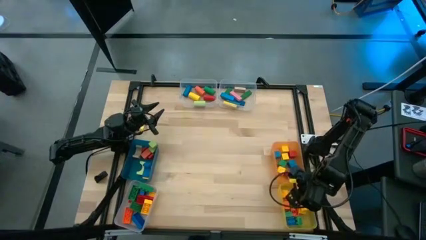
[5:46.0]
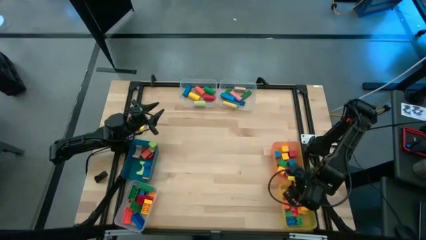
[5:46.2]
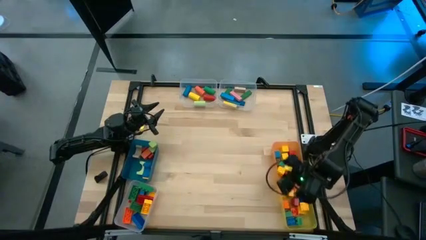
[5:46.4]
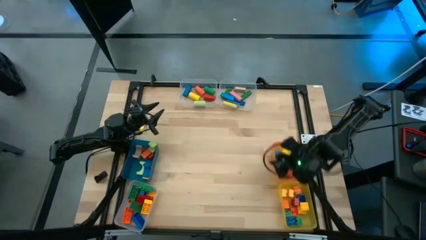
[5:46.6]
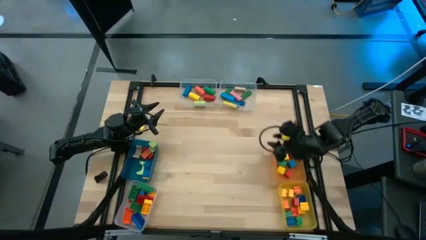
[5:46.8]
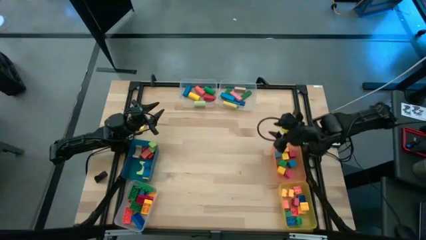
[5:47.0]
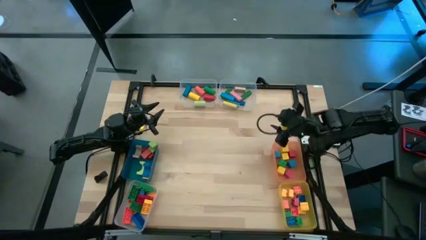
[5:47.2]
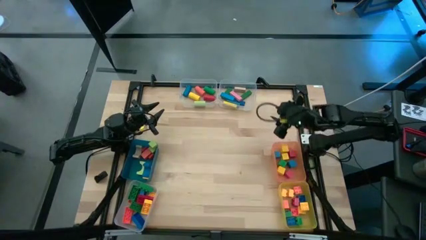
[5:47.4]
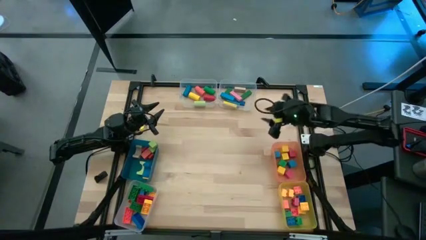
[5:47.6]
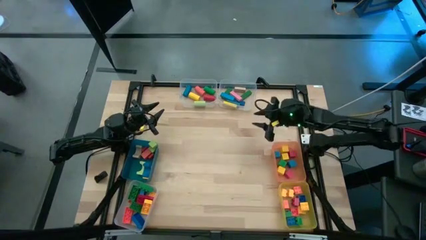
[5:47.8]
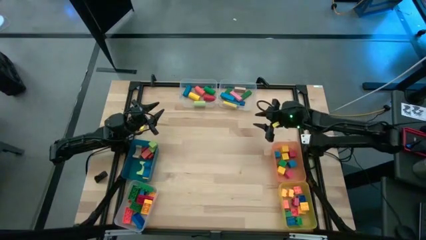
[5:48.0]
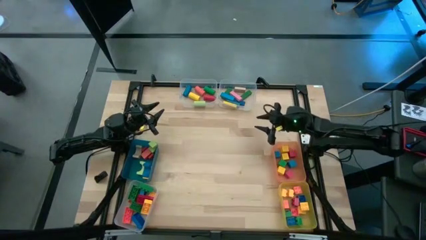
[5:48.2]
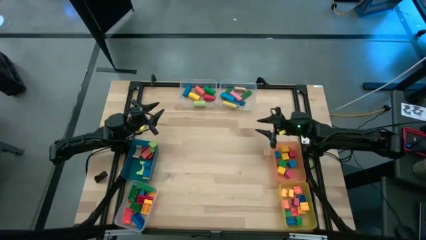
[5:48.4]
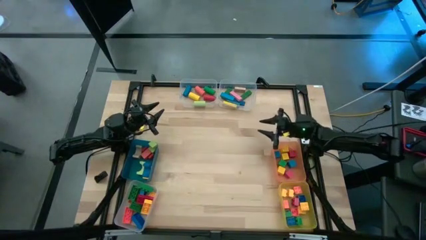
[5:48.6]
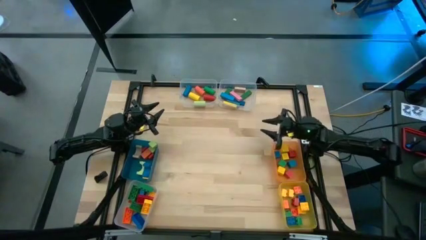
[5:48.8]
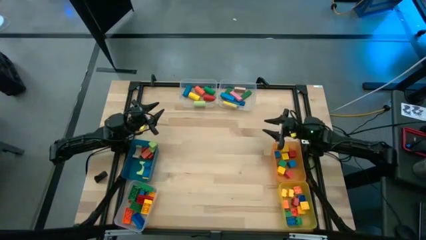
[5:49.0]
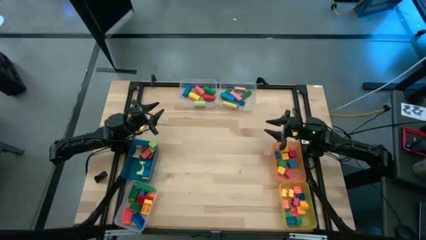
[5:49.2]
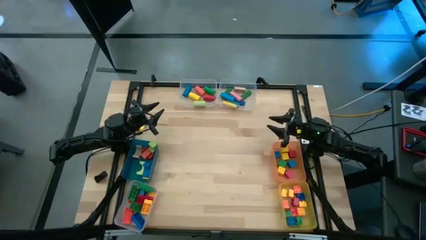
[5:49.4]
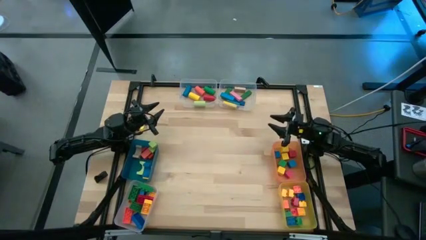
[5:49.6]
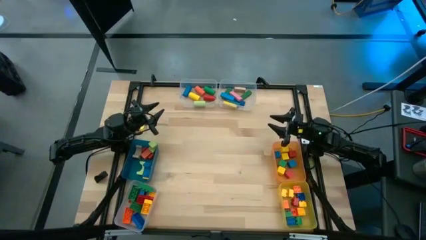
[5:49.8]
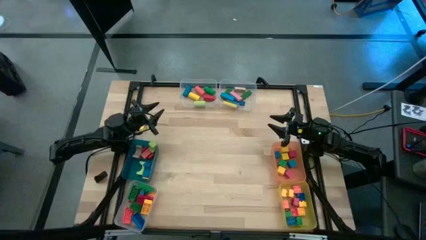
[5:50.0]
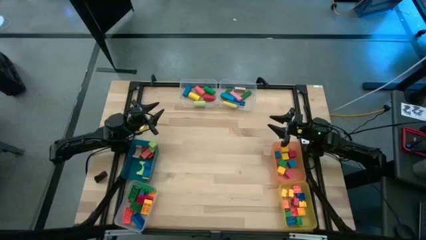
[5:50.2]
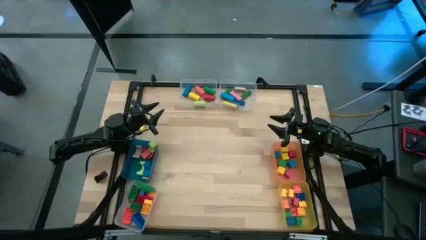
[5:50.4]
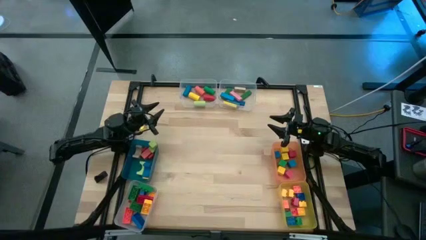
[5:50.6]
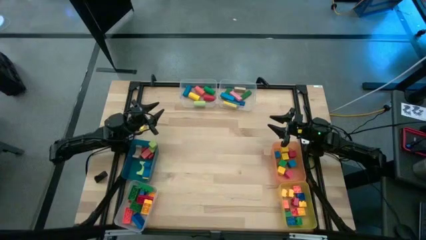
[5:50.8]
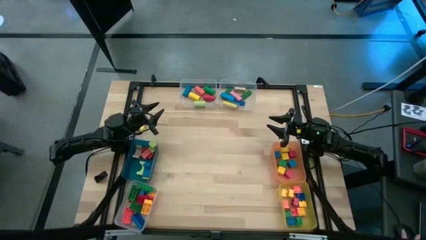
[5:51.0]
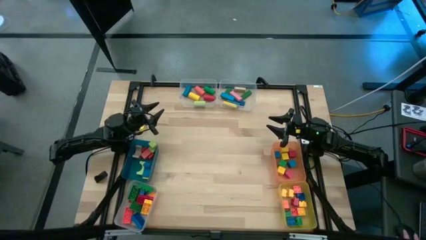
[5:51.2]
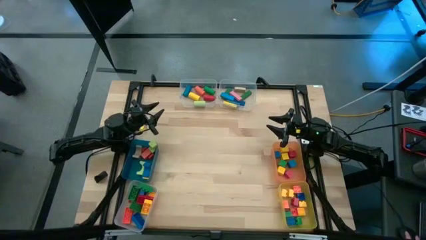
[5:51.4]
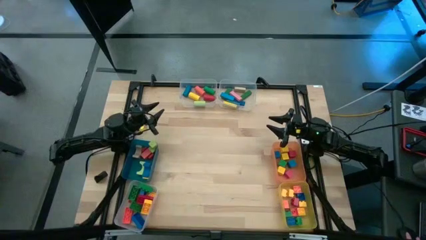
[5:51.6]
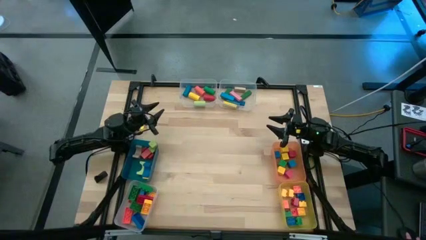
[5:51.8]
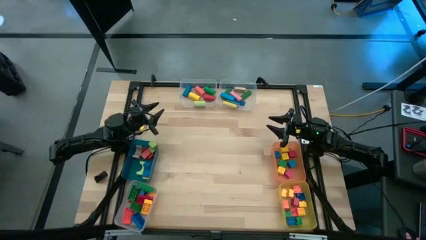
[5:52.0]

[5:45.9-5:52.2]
Task: Sort blocks by size
Return to Home Position

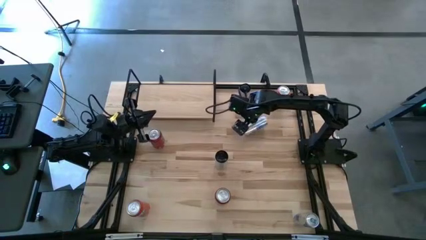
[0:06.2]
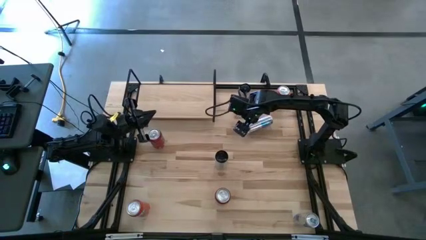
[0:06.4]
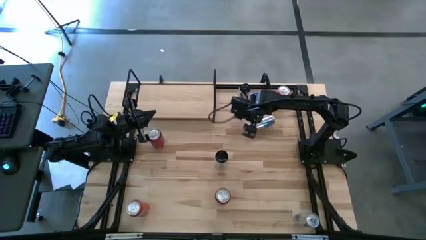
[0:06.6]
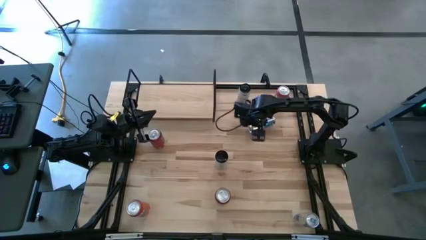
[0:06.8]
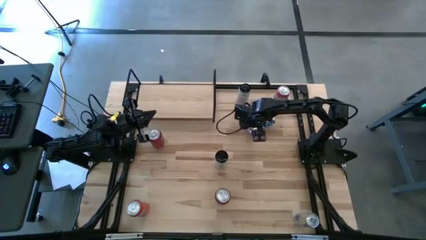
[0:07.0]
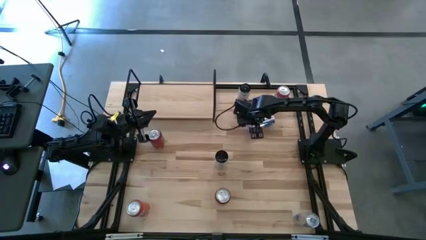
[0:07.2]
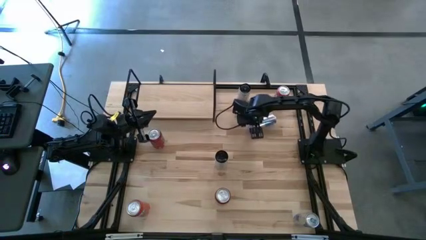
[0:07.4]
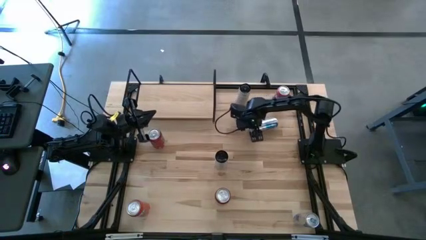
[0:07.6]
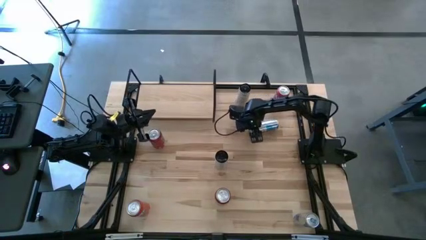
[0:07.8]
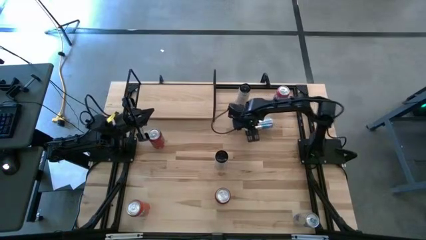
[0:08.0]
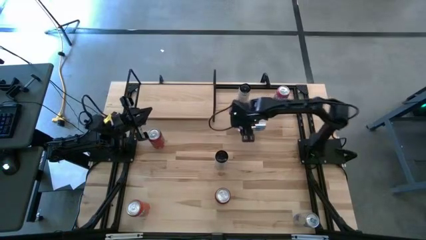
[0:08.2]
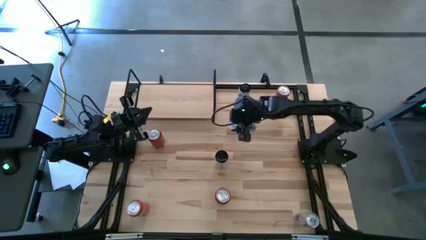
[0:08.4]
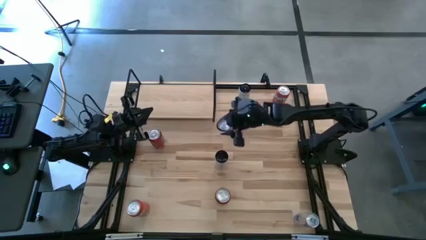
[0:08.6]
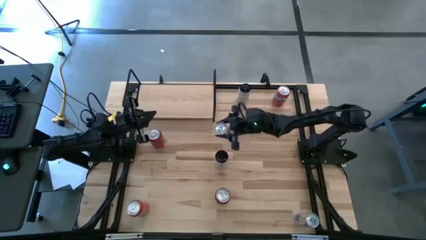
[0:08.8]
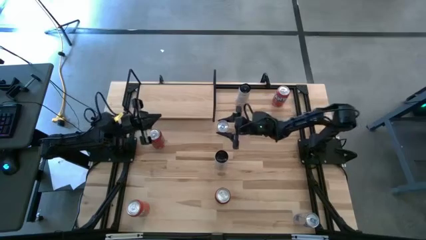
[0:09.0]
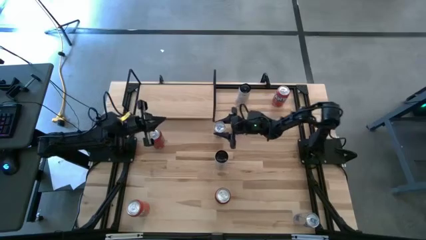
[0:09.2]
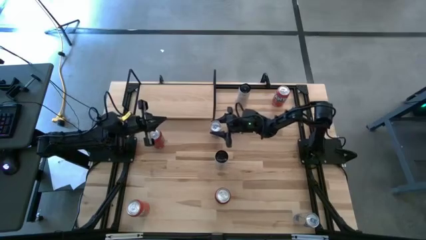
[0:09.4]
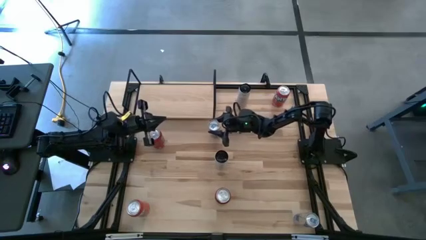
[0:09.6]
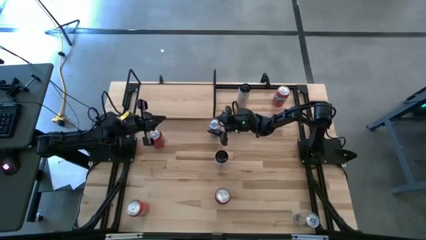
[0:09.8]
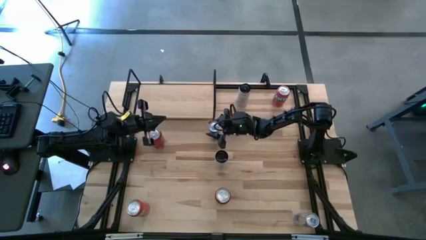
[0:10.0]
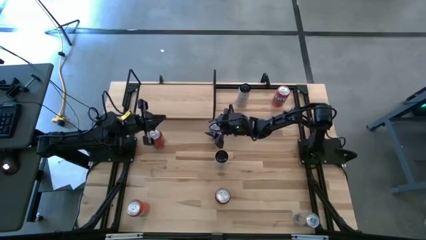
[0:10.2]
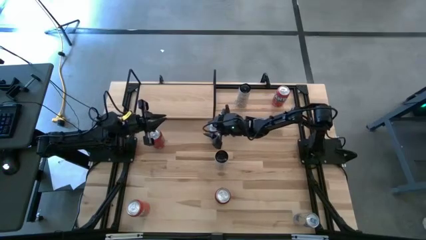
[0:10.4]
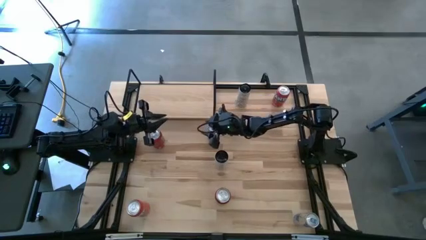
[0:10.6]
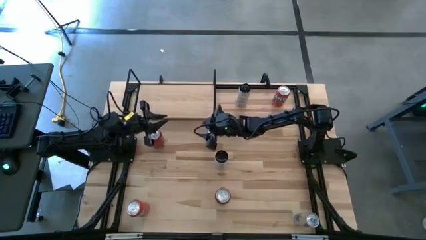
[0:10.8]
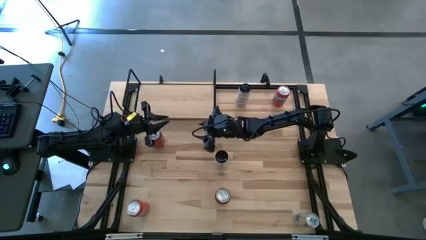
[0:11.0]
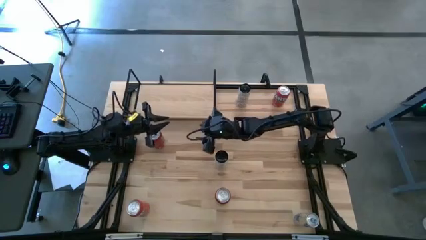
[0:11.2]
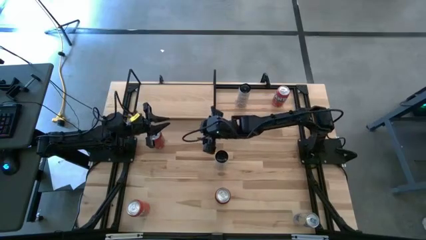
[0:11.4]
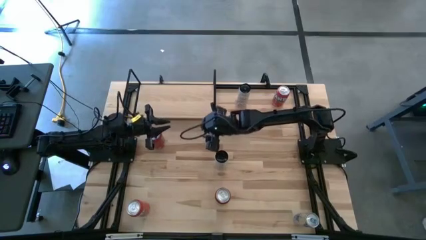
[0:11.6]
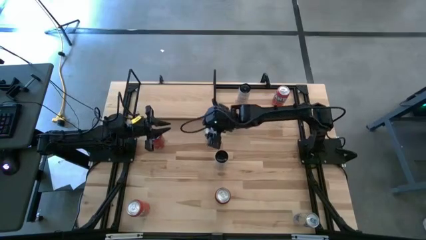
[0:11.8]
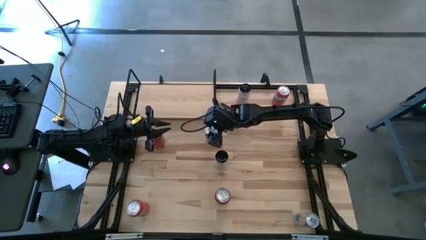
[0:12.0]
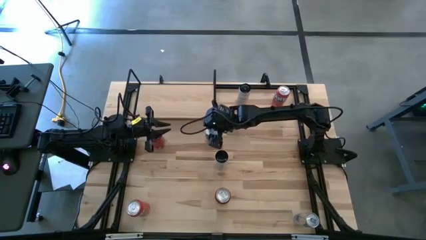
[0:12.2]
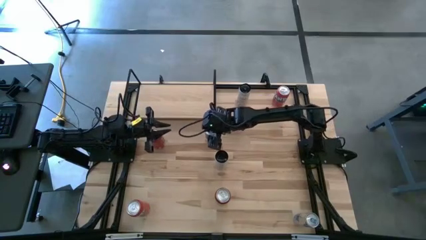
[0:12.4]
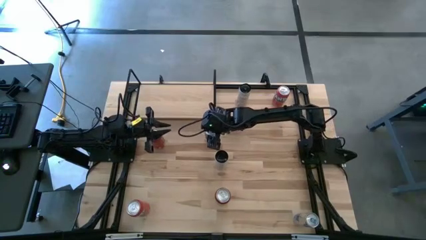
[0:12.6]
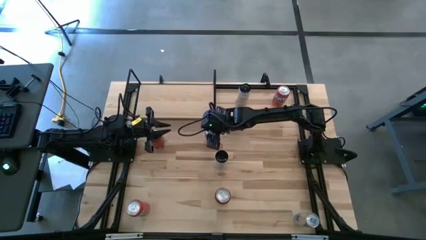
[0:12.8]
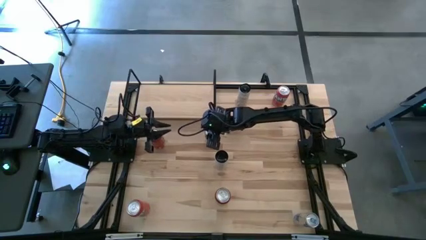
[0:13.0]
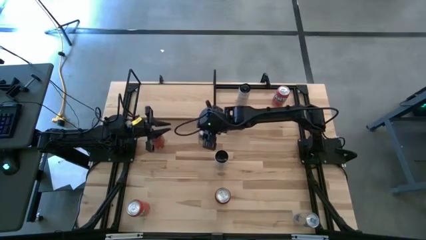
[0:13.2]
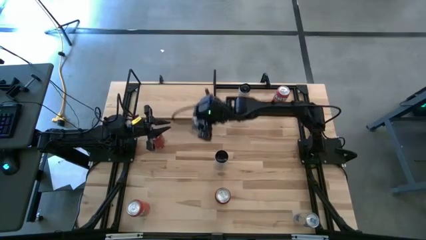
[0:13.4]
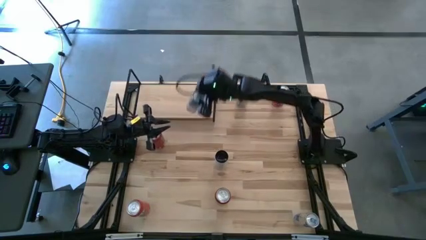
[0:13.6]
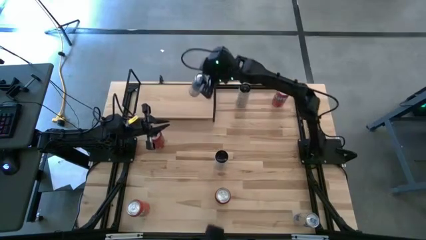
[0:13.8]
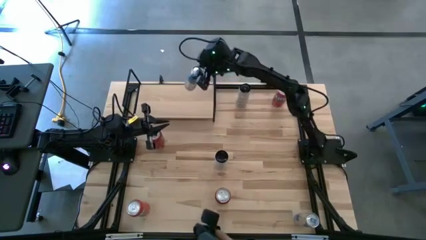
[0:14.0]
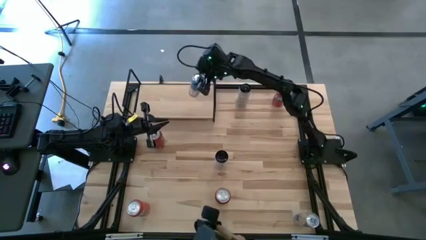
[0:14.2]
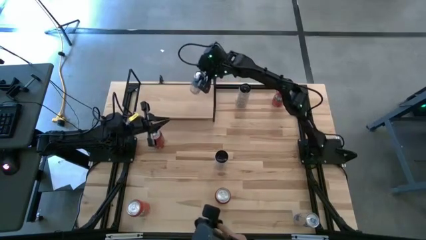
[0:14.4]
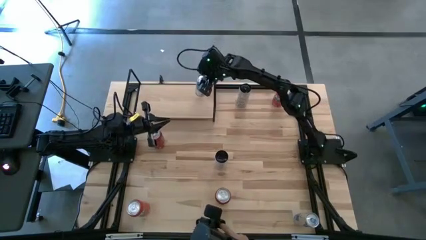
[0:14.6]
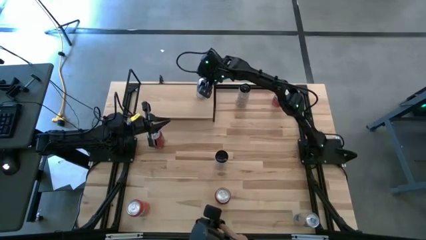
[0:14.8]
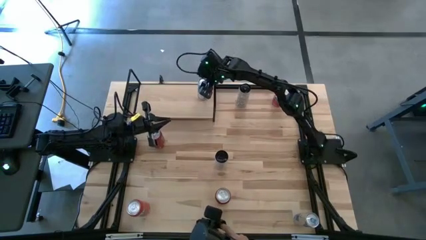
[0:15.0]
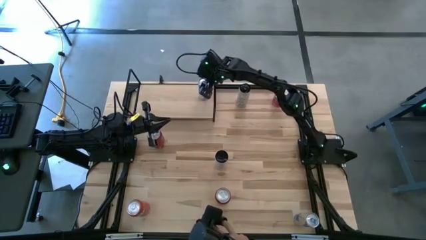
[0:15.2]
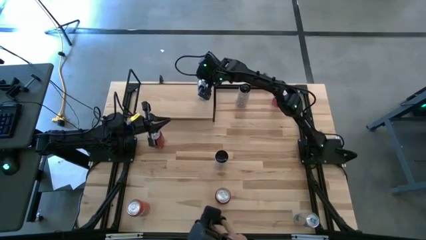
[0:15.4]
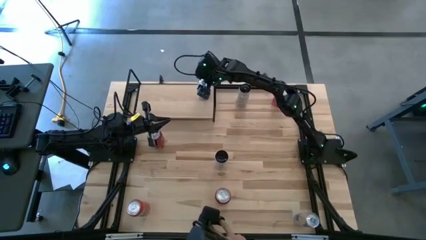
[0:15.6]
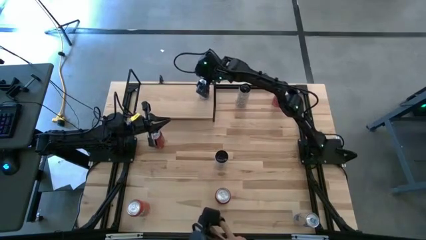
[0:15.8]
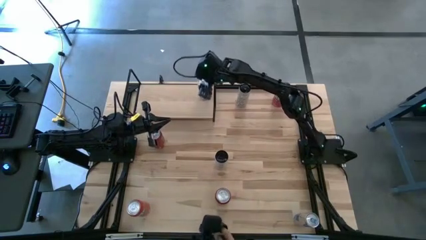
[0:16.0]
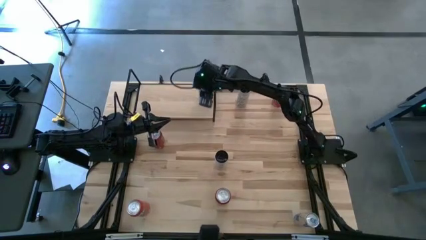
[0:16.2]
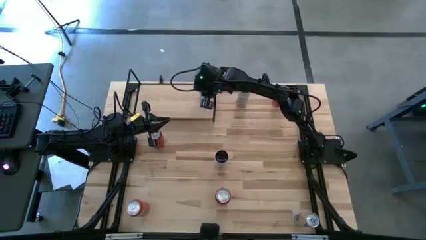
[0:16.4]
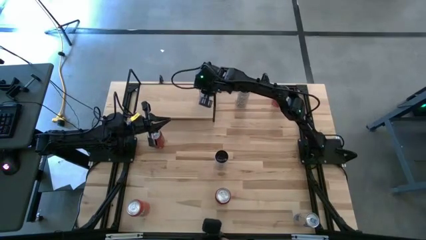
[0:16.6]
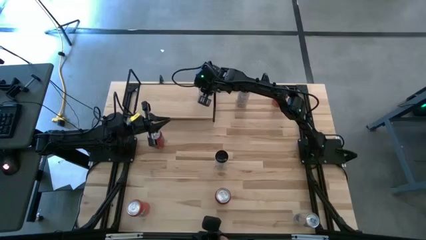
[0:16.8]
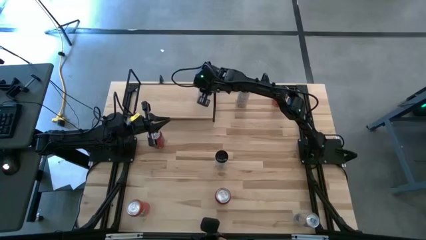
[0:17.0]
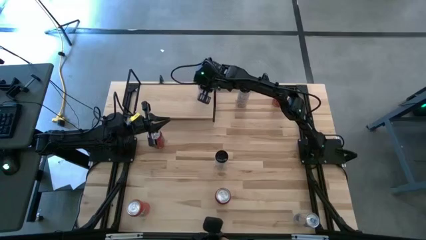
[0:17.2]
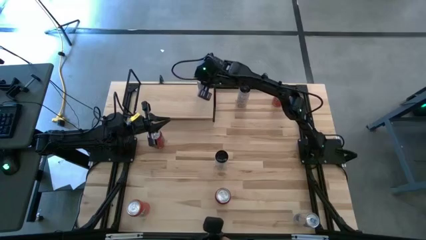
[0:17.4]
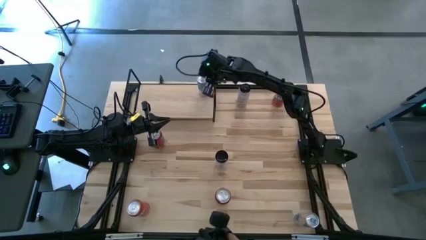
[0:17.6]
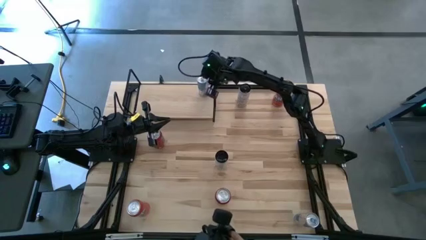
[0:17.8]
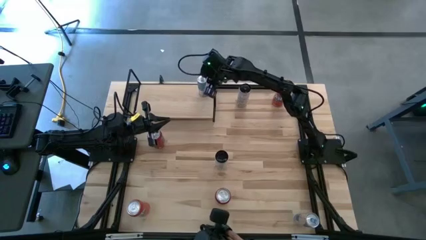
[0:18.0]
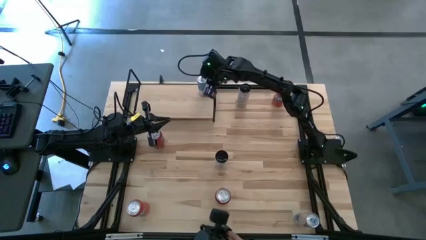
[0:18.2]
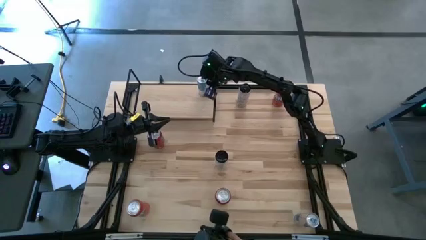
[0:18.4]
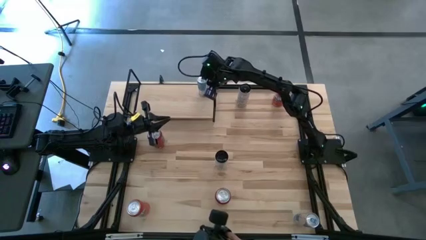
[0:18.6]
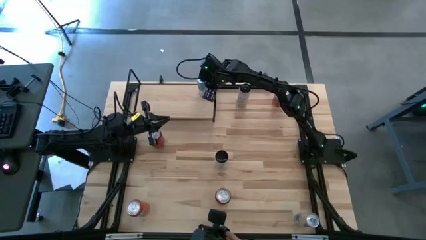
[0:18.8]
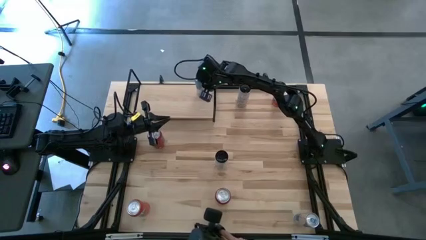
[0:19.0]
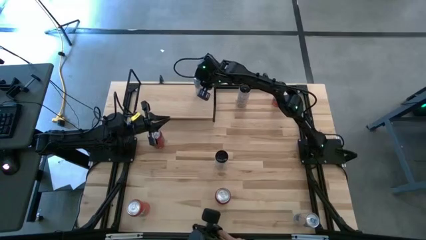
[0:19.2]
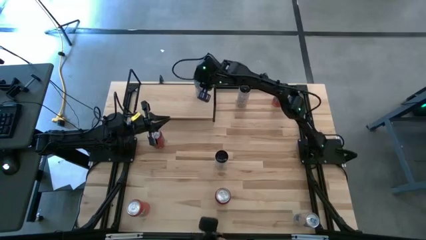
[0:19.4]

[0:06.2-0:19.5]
Task: Place canned beverage on shelf
Put the top blue soda can on the shelf
